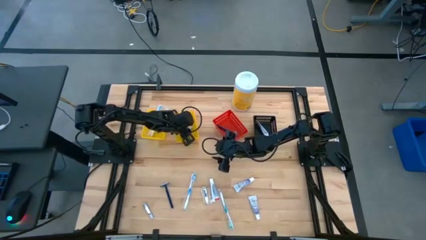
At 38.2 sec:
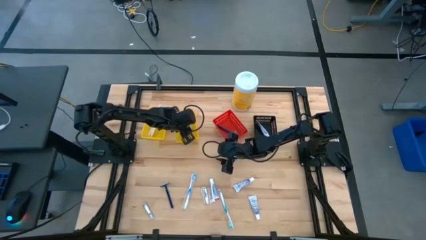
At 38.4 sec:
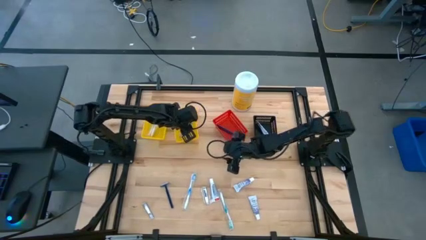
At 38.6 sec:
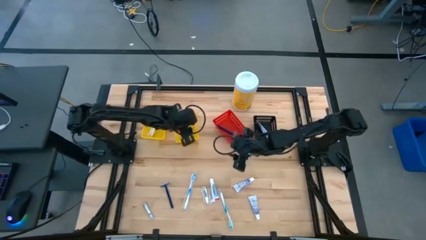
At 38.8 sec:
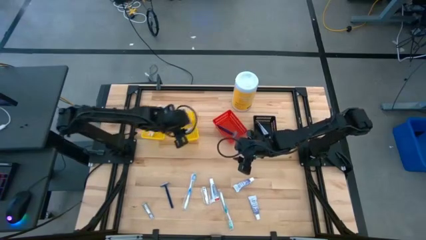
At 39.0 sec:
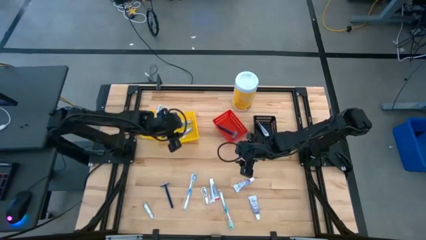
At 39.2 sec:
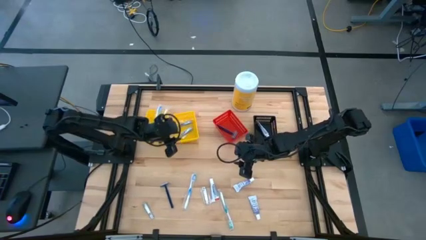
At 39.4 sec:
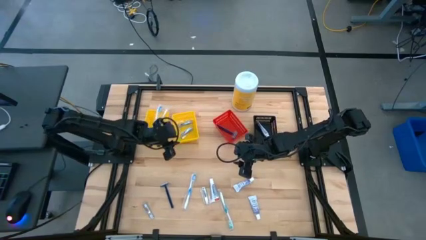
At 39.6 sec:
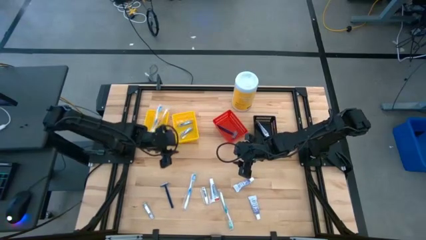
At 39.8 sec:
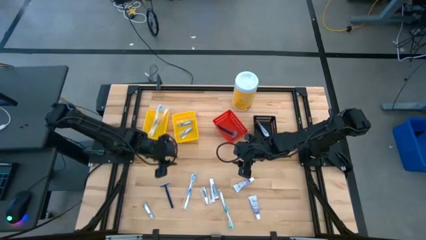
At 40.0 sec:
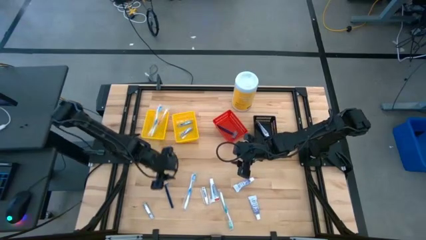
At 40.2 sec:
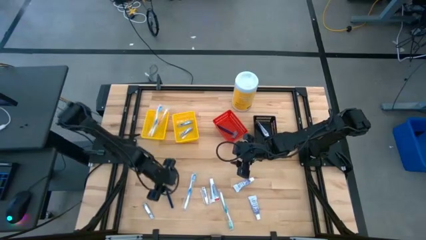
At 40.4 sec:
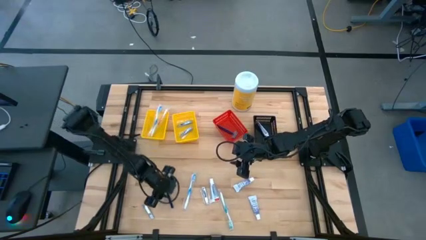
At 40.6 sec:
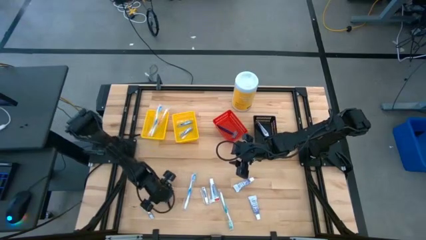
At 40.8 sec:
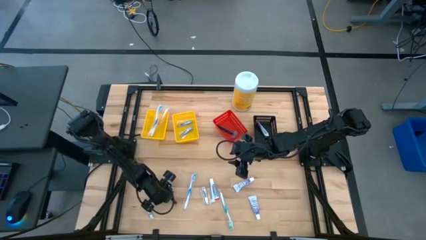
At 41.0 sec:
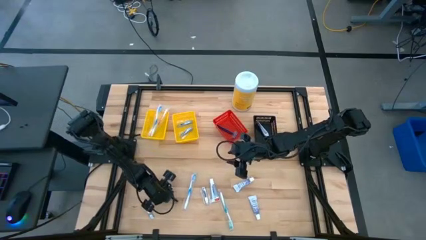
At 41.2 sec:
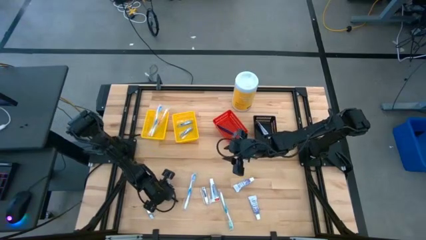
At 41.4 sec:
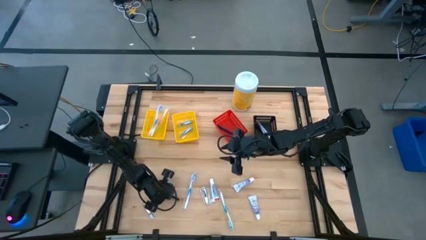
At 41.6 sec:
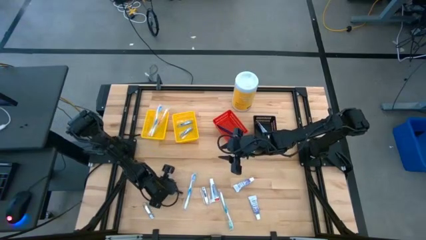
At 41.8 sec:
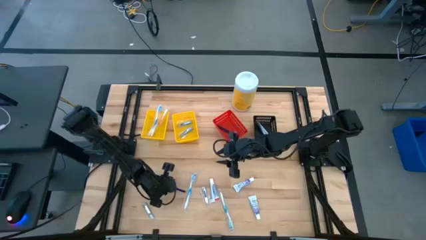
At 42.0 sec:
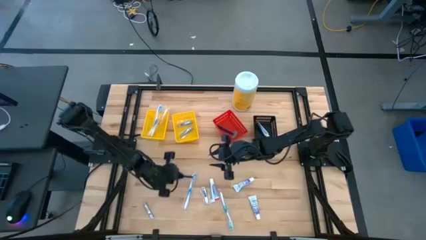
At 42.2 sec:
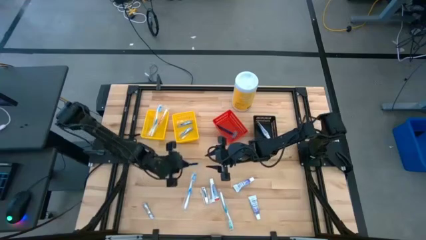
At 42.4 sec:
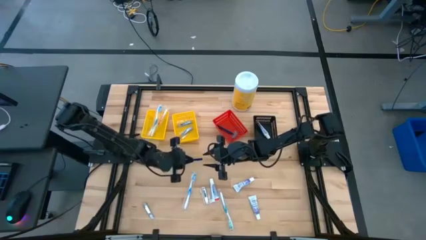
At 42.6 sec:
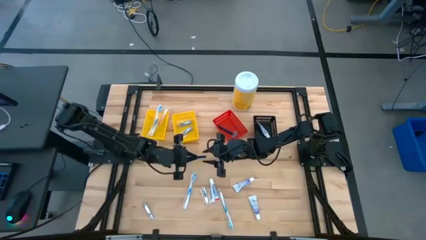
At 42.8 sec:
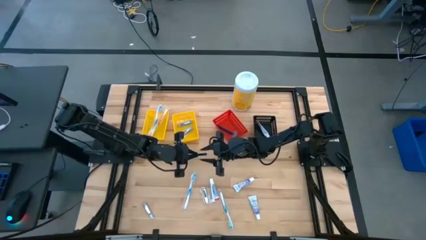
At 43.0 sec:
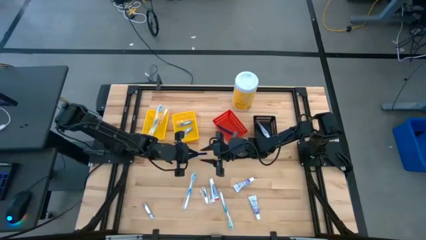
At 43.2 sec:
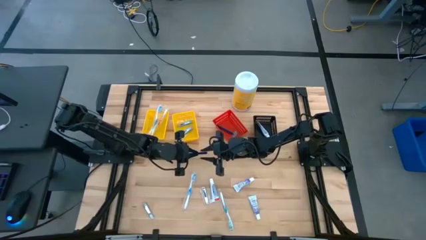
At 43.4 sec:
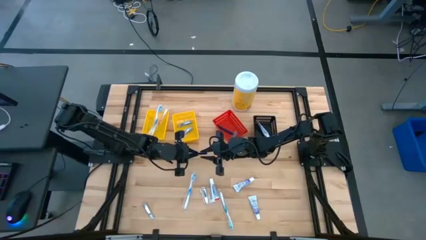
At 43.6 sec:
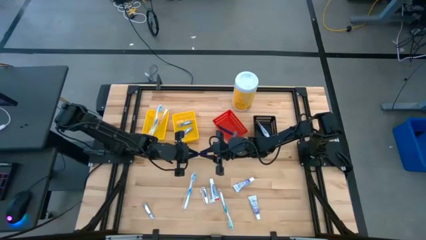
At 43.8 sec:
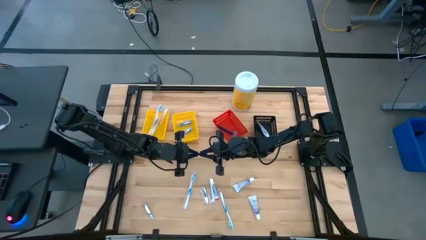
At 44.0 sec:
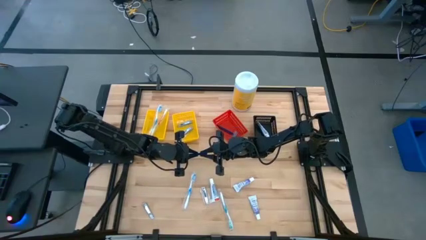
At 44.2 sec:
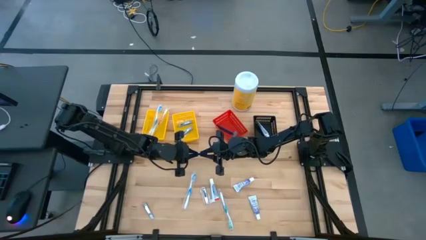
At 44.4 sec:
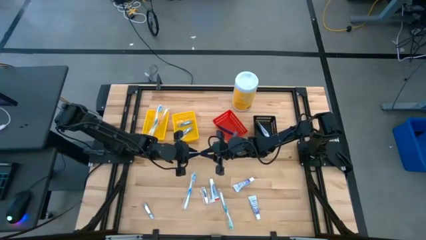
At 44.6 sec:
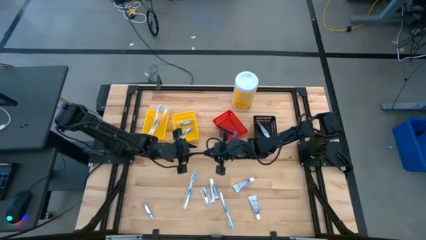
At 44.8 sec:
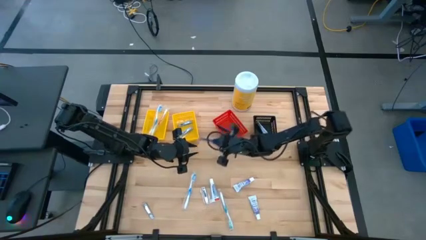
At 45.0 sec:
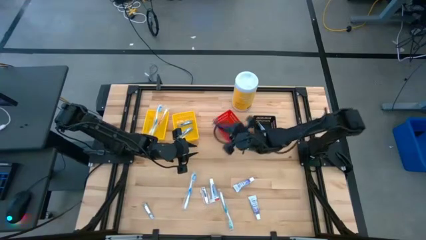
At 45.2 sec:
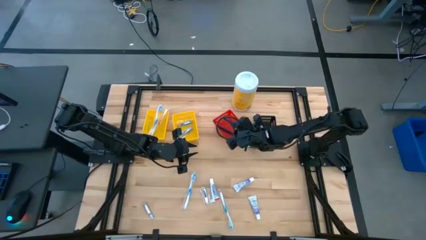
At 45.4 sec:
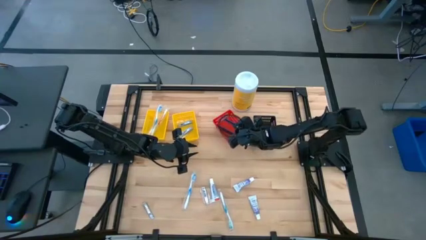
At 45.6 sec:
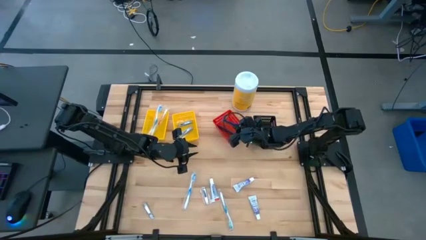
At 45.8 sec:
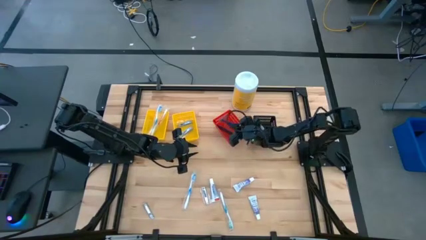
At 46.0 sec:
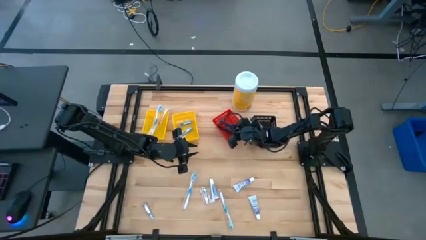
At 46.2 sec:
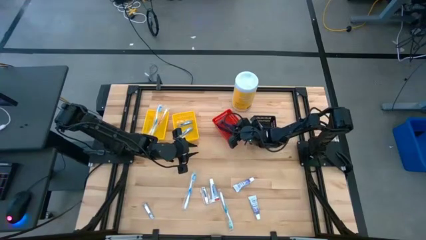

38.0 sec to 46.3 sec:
Task: Pick & Place Travel size toiletries
Put the blue razor into the red bin

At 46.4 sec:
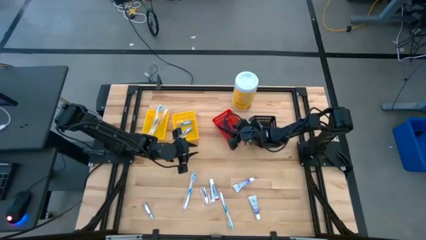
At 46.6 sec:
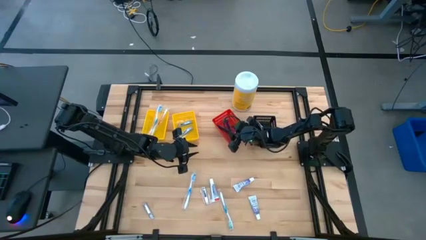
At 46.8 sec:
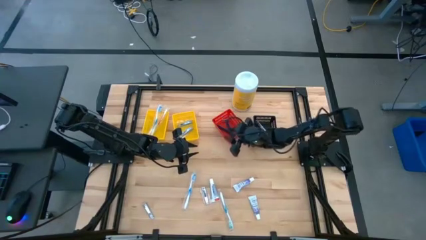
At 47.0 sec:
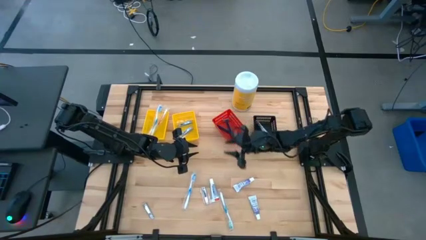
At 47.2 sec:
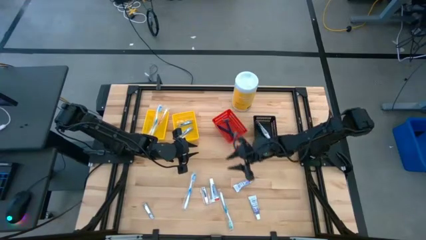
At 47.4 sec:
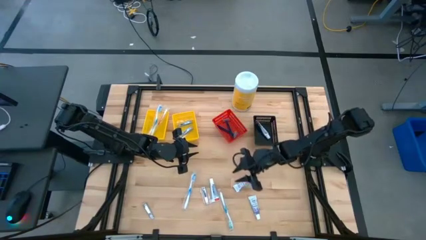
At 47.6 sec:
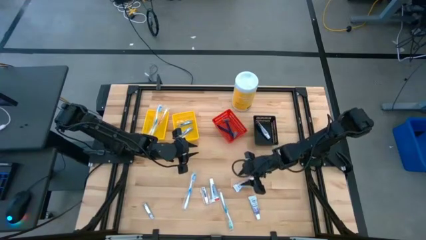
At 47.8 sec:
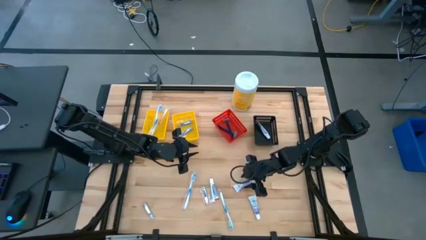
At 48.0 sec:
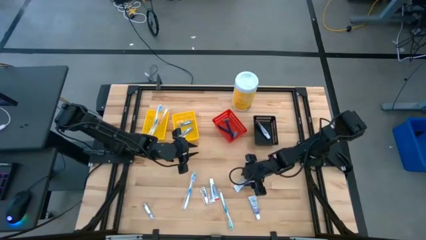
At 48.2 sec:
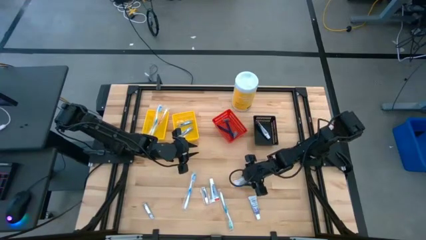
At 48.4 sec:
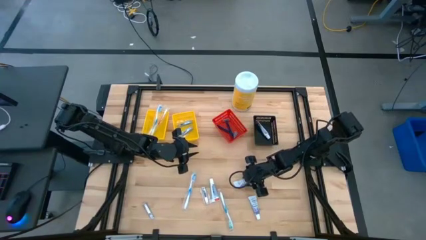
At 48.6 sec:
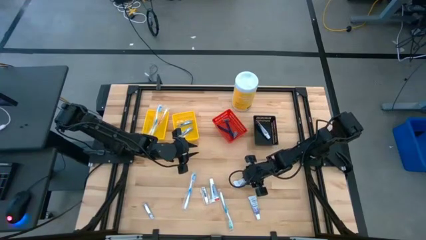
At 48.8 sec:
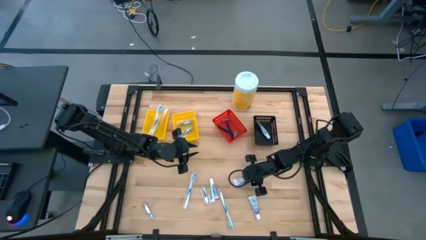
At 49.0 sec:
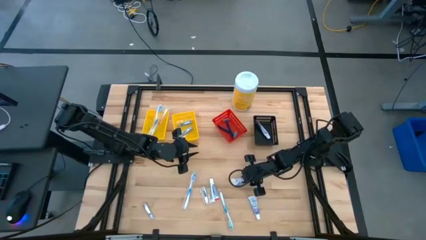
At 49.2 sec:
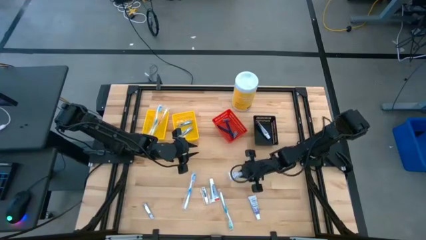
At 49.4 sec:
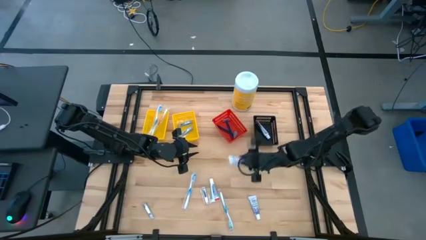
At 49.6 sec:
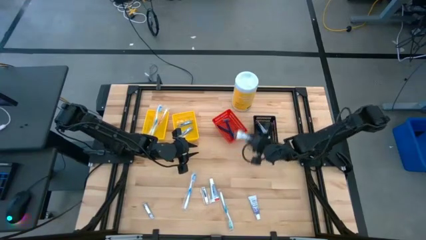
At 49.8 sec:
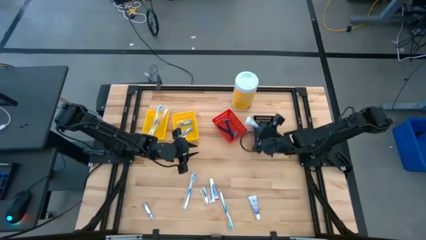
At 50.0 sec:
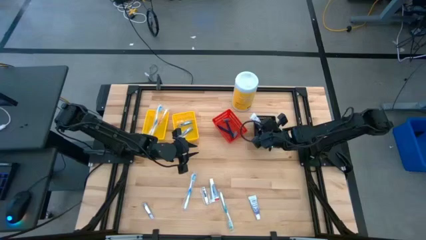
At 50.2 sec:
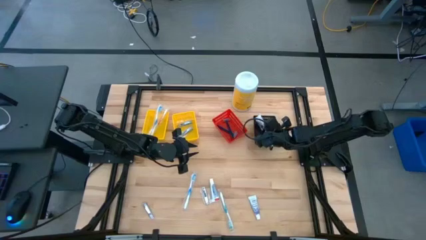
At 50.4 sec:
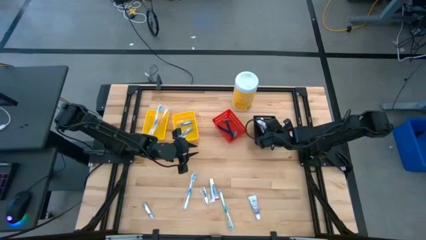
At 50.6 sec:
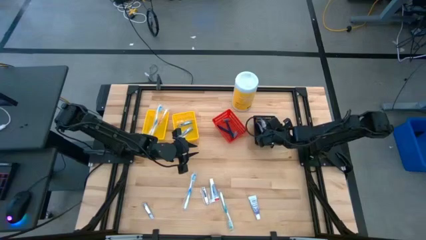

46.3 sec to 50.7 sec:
Put the white toothpaste into the black bin

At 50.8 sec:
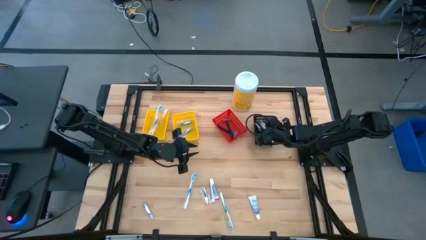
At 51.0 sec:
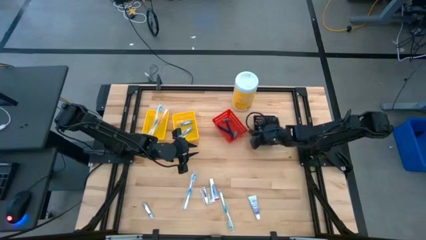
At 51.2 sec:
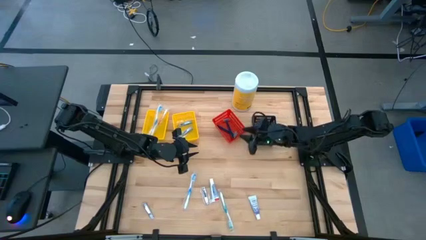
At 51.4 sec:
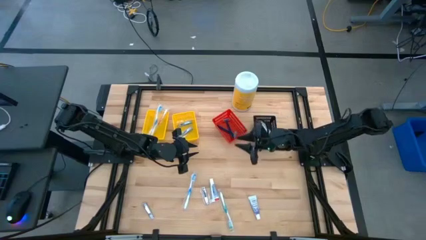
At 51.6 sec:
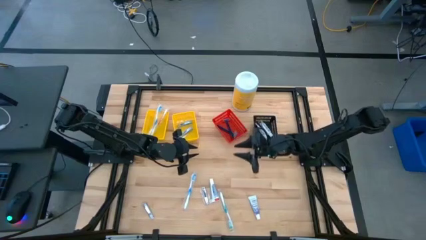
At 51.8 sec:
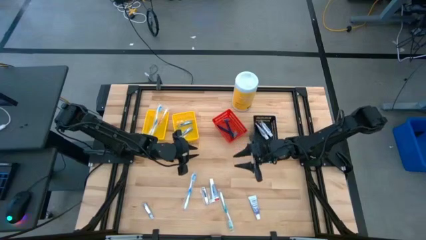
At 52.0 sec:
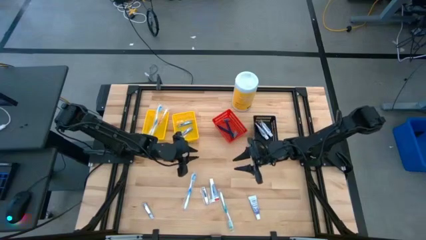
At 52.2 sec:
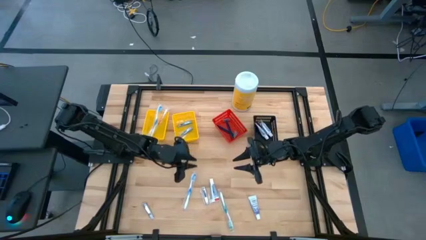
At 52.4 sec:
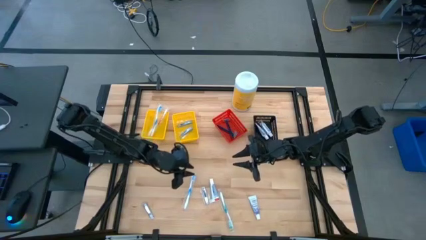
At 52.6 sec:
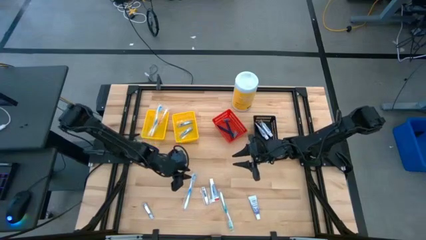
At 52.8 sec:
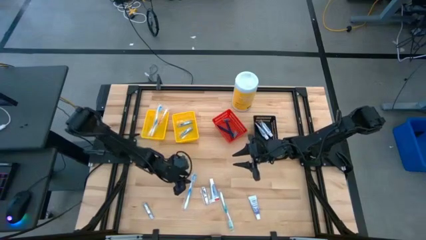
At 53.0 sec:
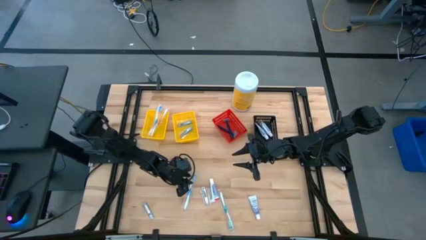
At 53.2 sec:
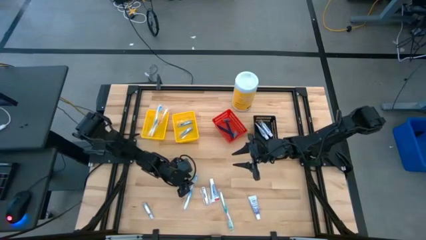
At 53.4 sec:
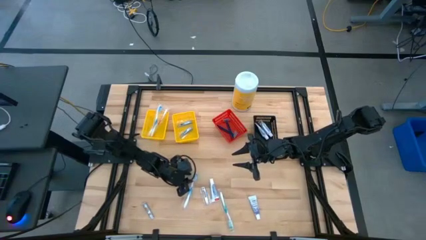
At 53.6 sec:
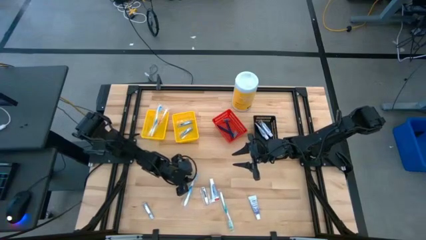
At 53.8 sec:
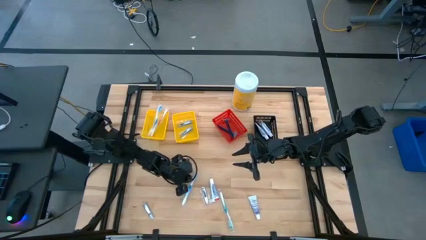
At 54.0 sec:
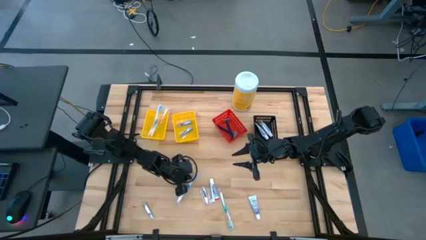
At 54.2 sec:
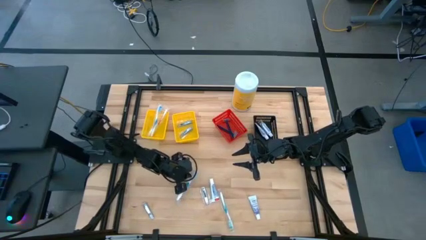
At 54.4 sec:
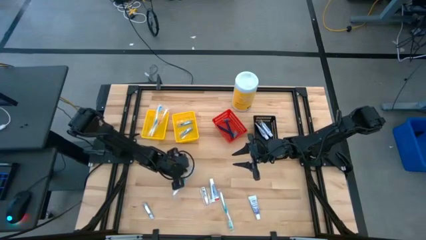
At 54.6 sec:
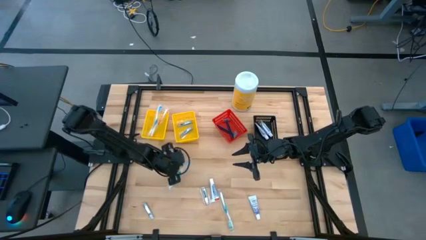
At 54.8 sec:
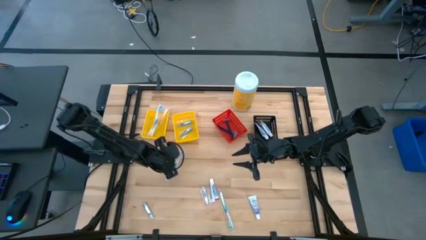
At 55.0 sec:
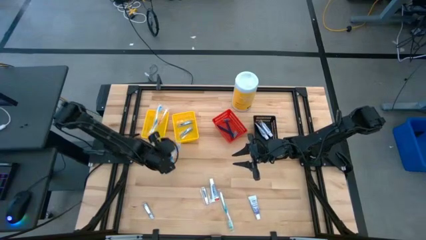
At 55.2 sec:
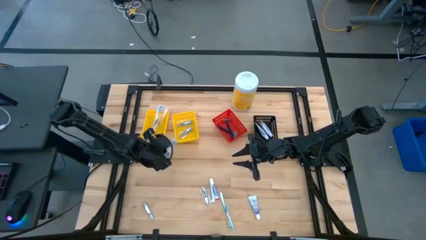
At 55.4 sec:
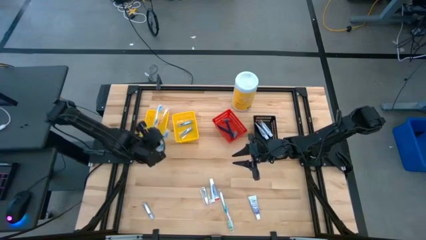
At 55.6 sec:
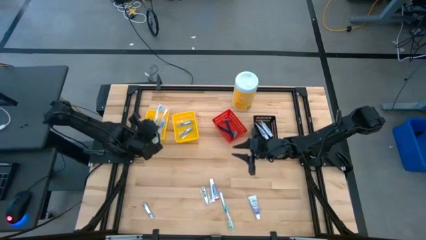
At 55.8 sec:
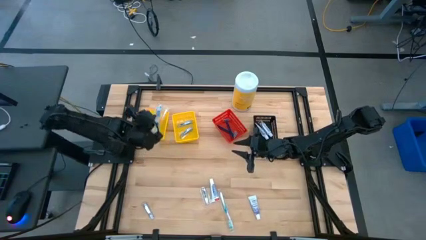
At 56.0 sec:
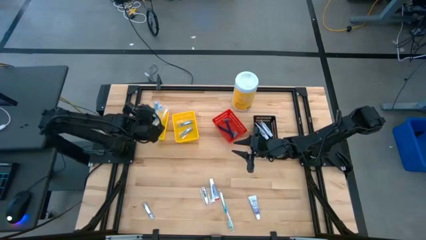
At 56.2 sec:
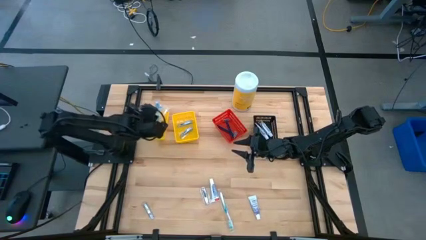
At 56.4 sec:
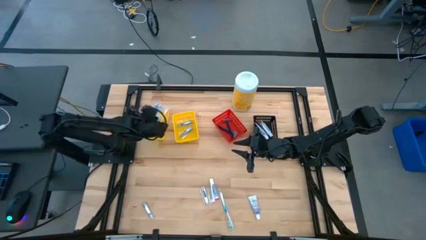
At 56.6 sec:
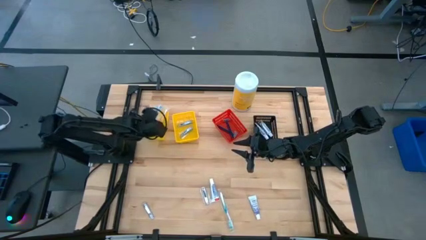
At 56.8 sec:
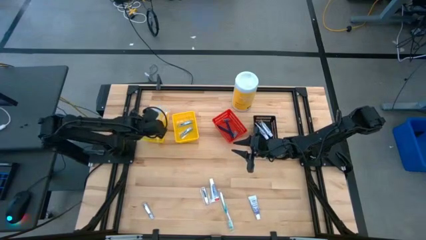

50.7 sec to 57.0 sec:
Put the blue toothbrush into the left yellow bin
